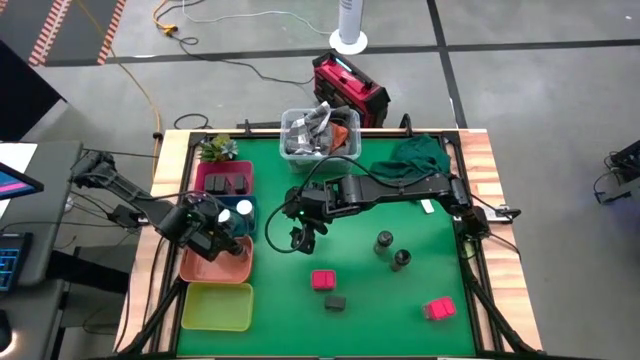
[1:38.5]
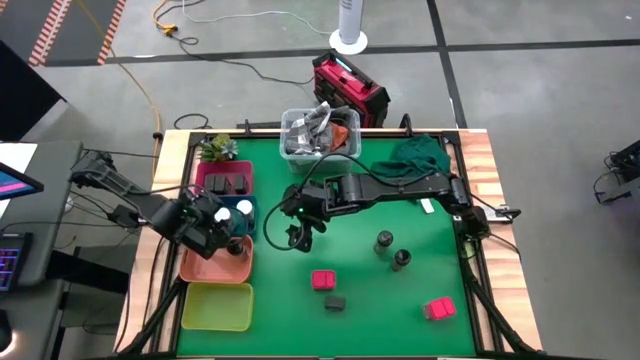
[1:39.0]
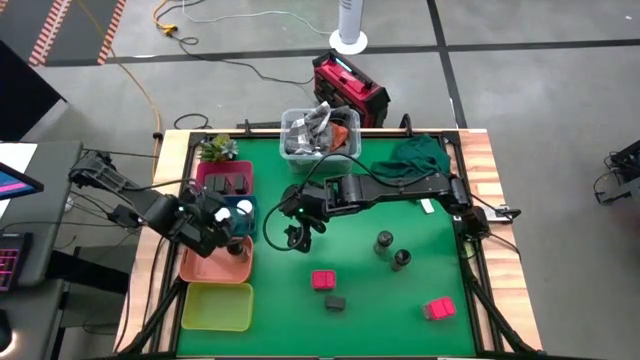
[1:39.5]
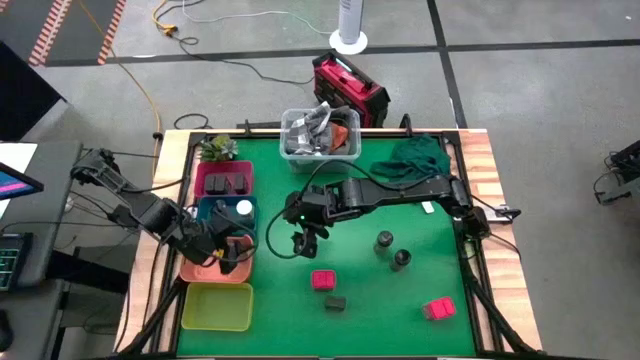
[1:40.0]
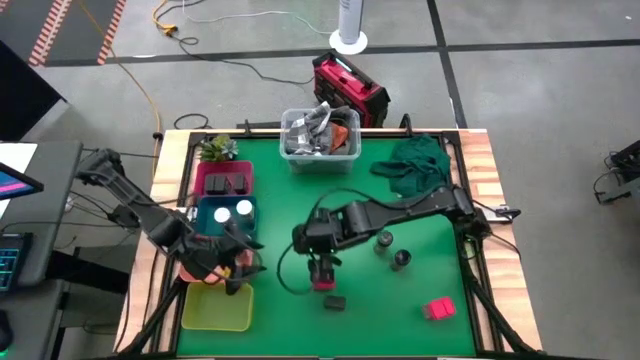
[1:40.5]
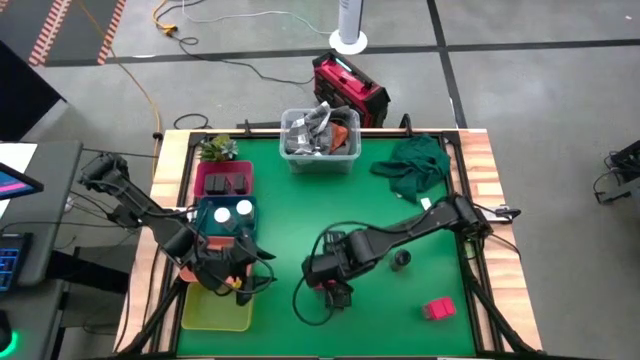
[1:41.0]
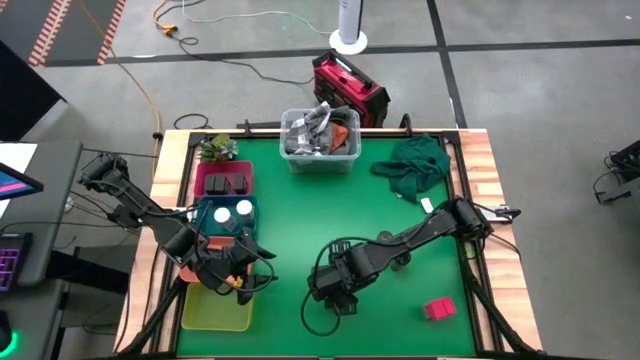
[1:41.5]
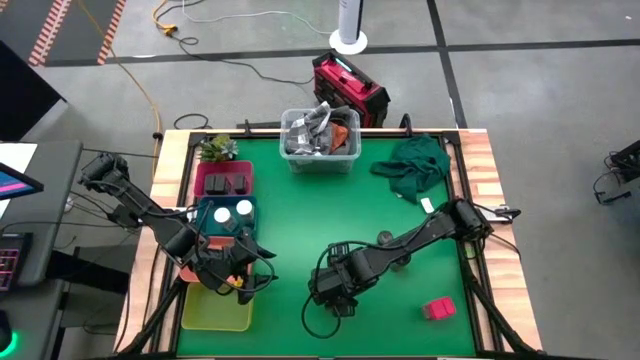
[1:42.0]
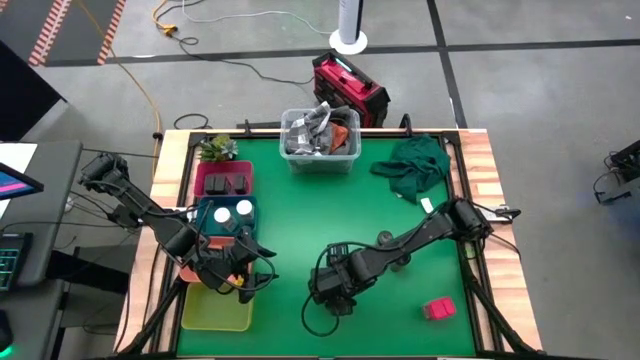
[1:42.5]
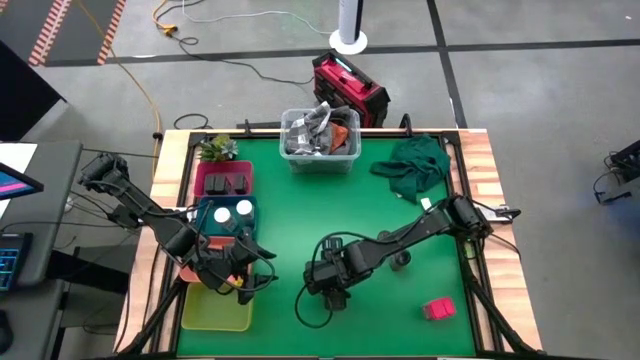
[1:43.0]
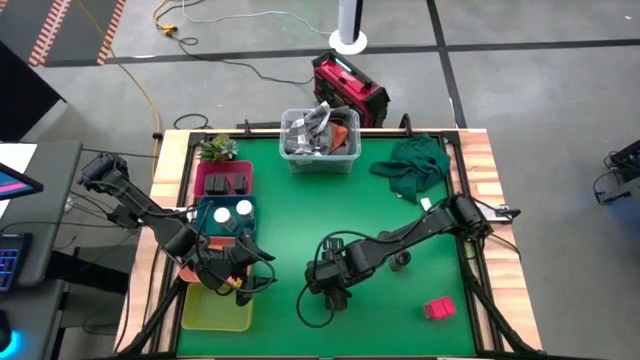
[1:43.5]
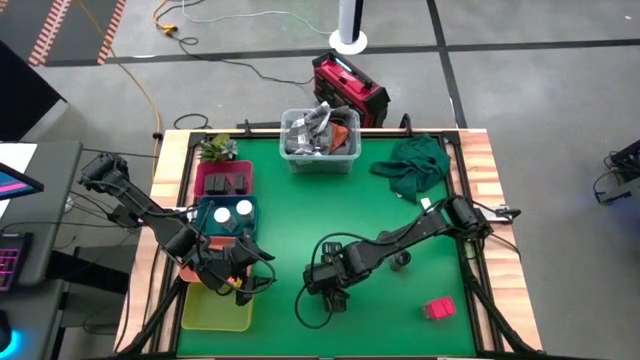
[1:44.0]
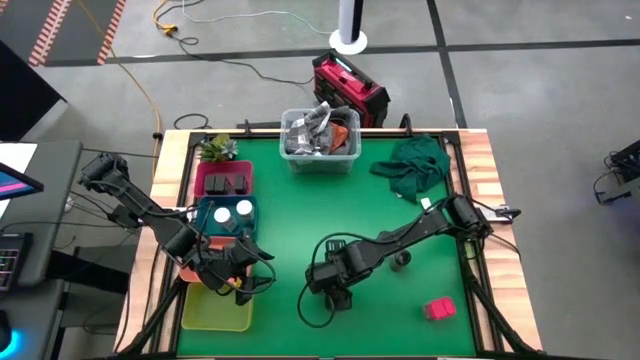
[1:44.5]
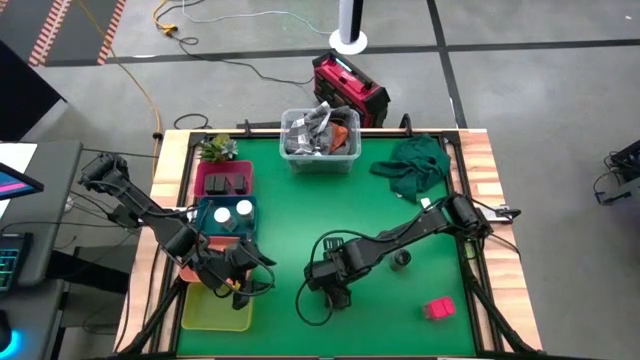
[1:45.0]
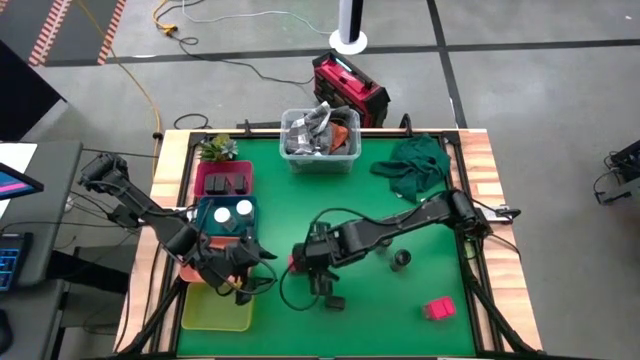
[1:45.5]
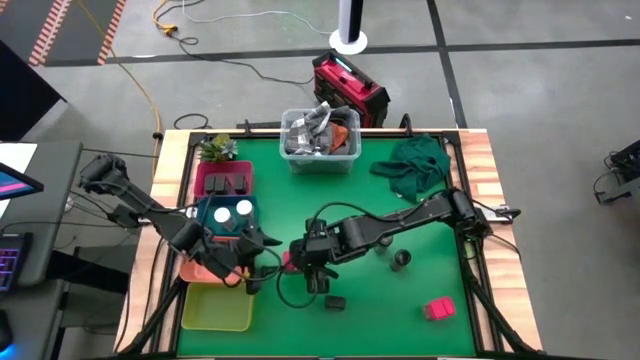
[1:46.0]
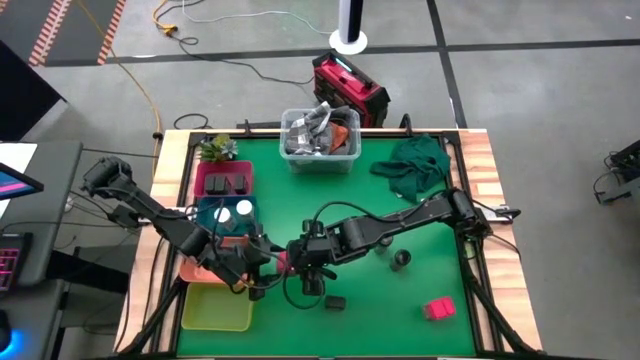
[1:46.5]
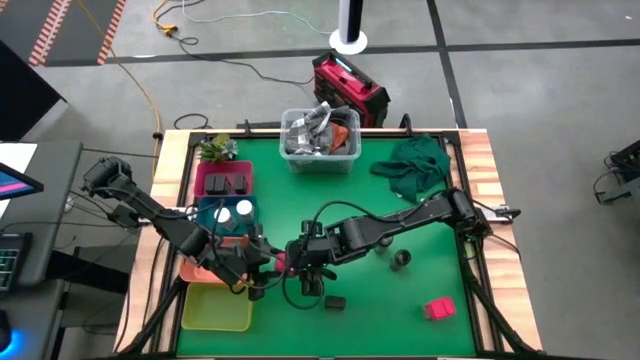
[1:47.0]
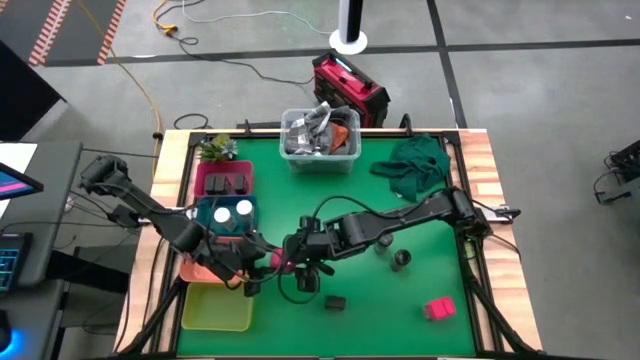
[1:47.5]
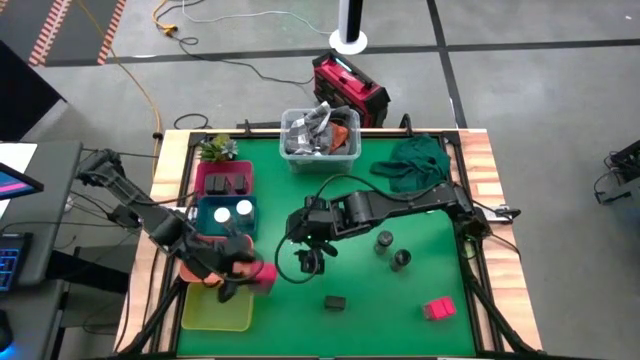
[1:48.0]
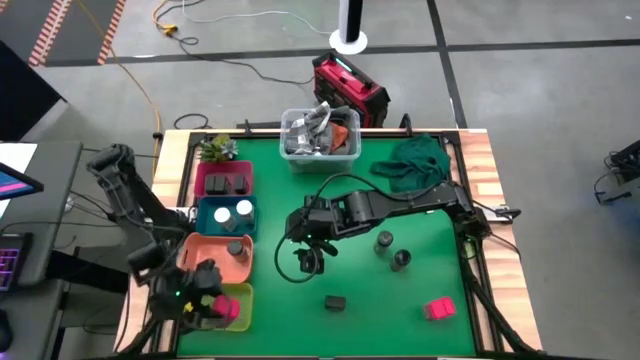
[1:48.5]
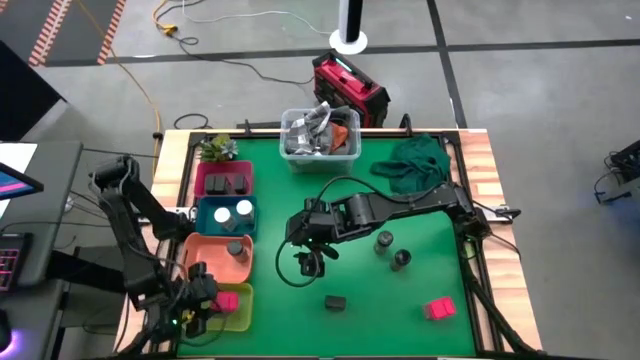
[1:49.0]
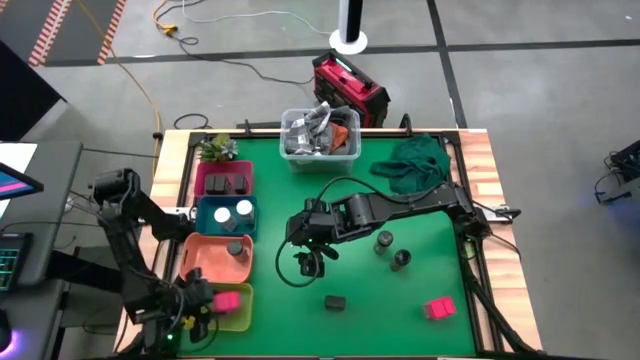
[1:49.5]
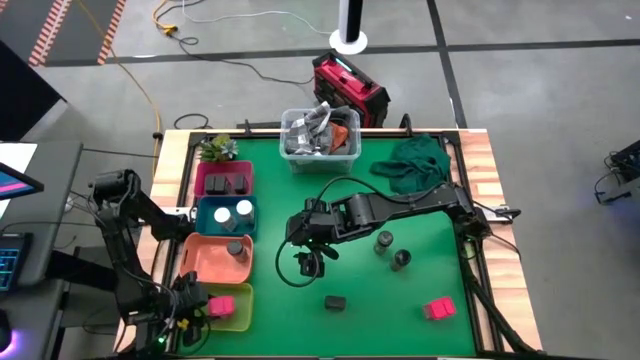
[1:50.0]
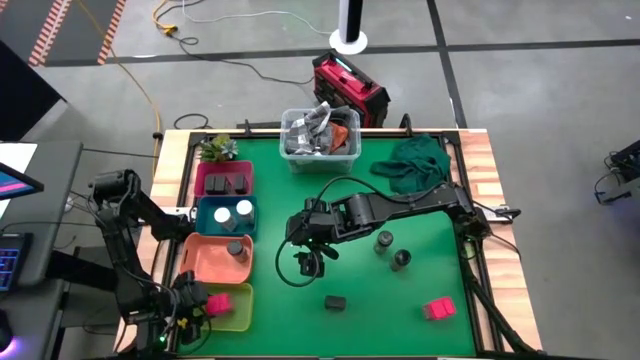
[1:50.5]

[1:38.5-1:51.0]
Task: Sort spices by type
Put the left red seasoning can into the yellow bin

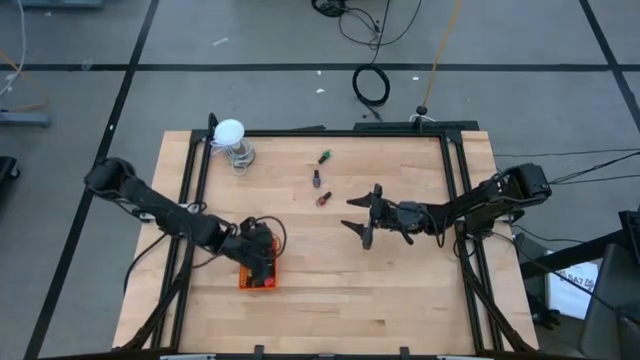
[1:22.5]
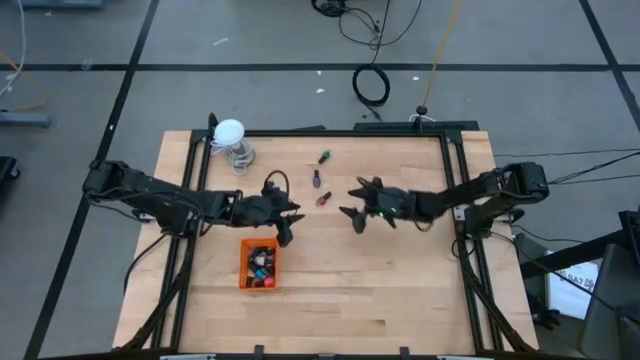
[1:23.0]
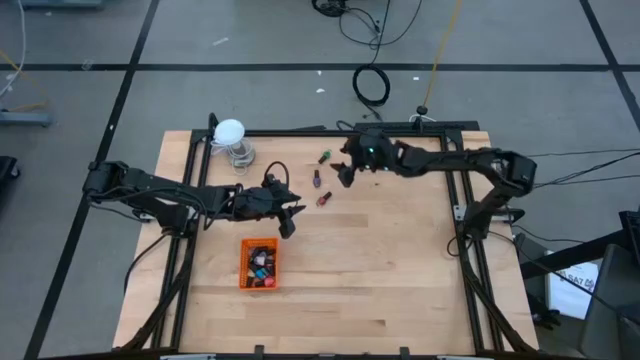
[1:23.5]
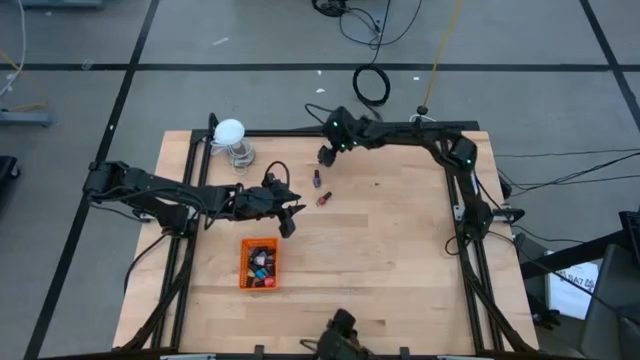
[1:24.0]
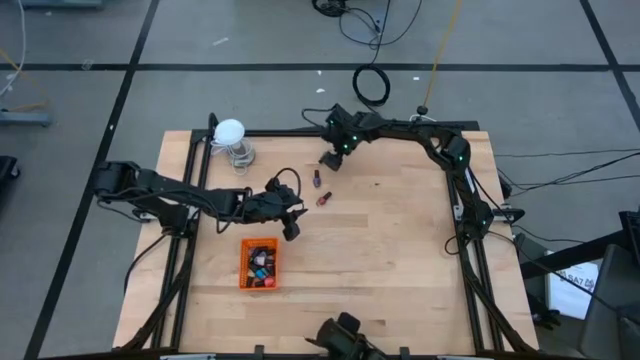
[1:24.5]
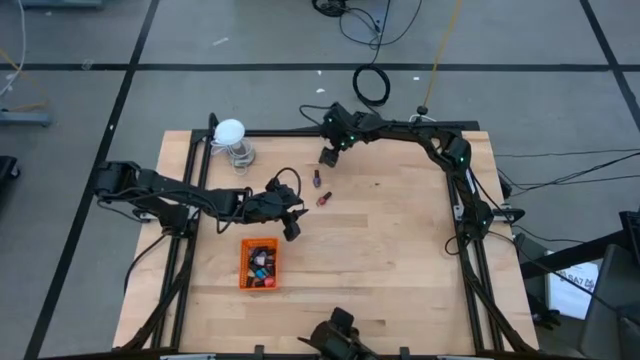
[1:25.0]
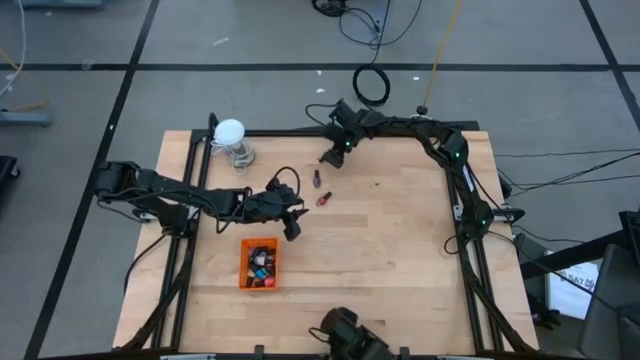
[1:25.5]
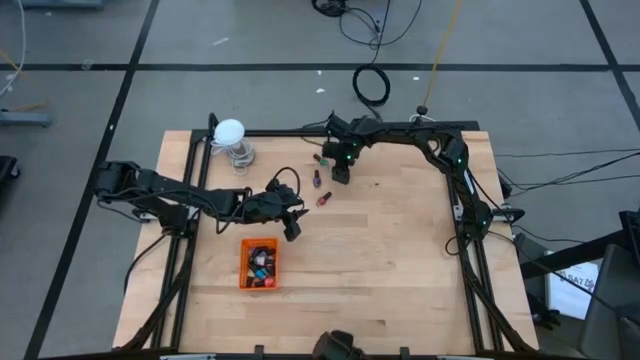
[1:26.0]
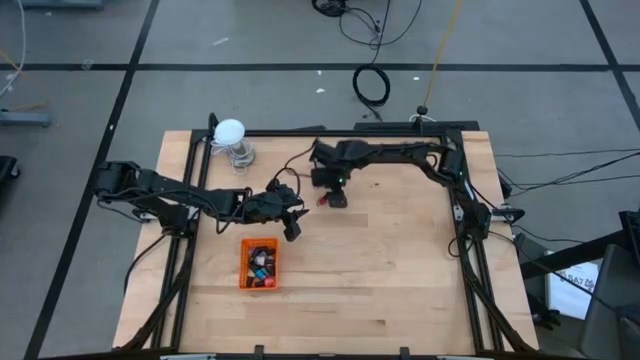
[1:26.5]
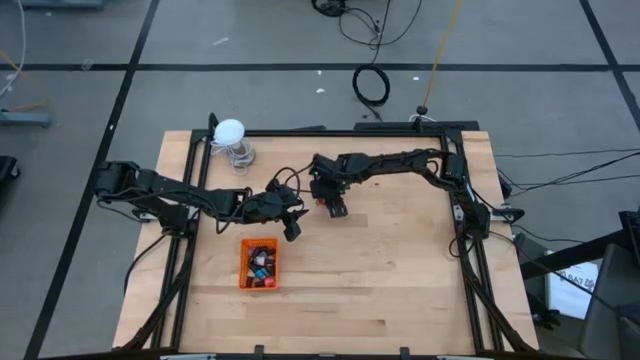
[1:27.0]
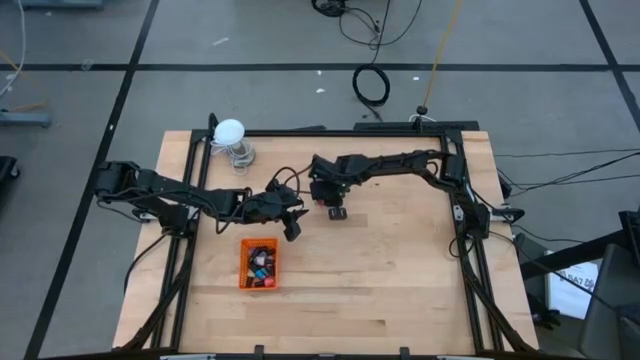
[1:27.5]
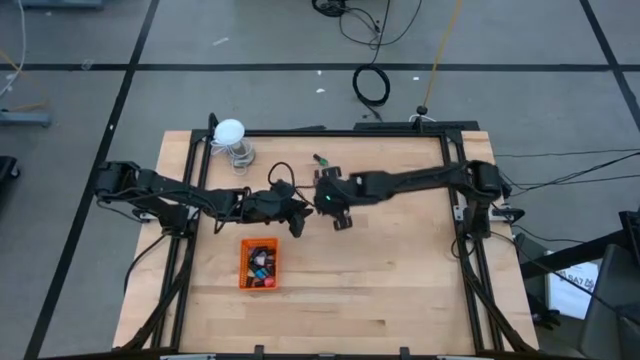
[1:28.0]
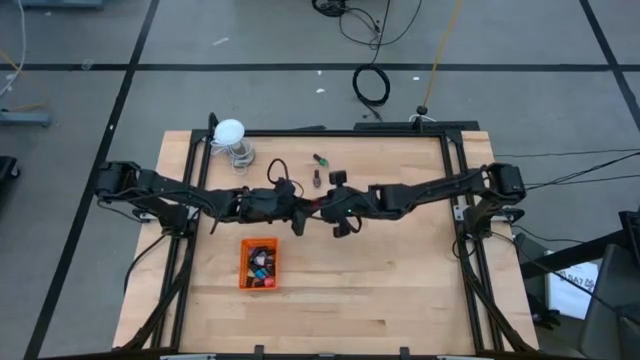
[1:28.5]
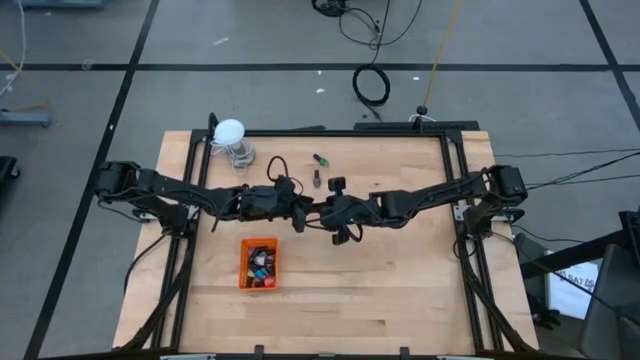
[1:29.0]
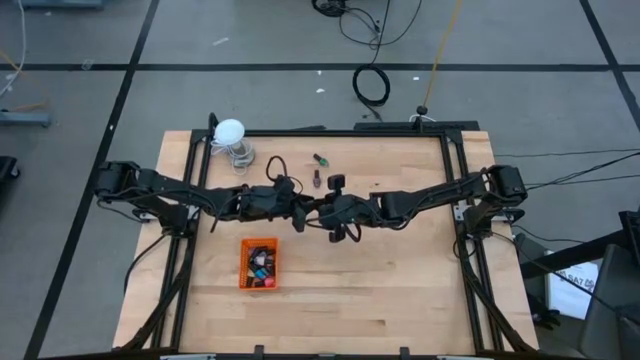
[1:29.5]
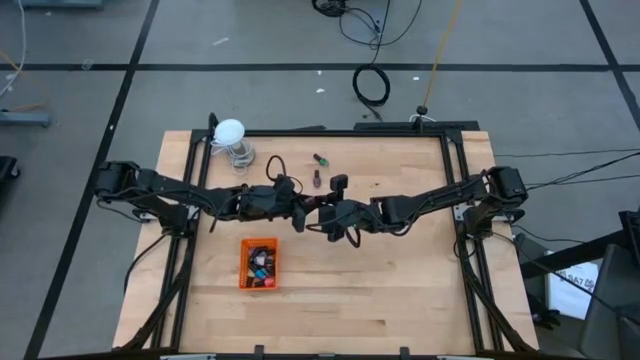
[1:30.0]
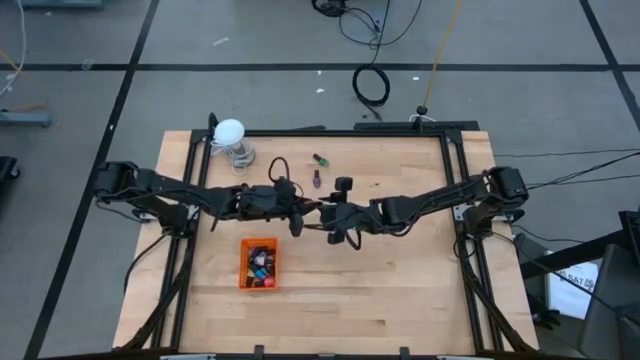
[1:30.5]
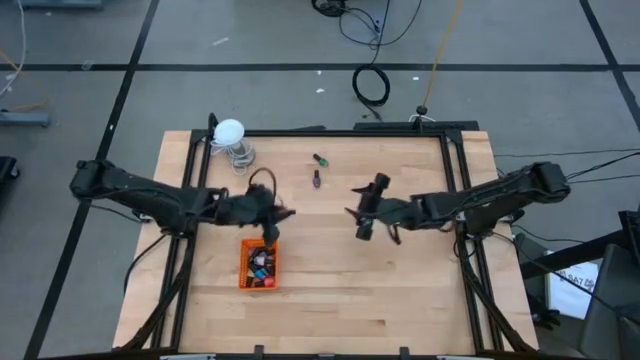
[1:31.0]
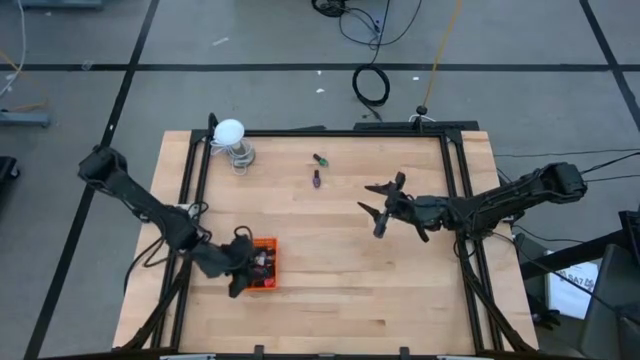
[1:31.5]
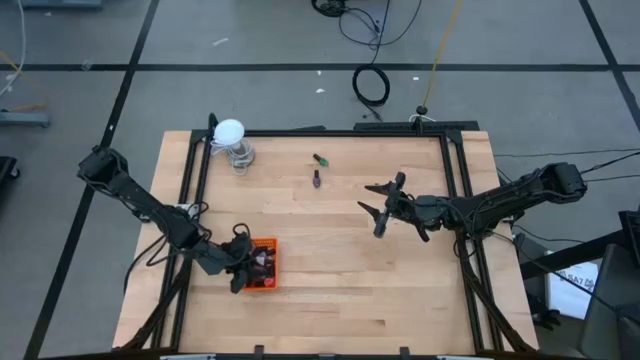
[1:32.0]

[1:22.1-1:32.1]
Task: Pick & Place Nail Polish
Put the red nail color bottle into the orange bin
